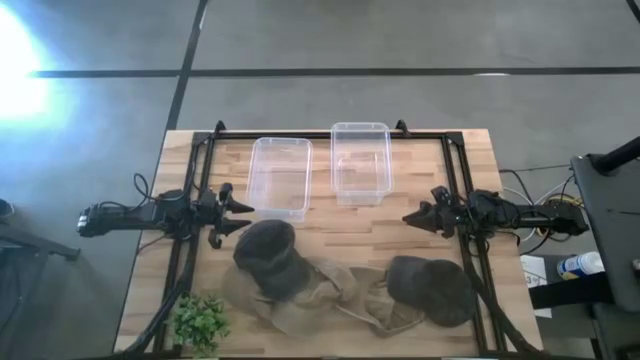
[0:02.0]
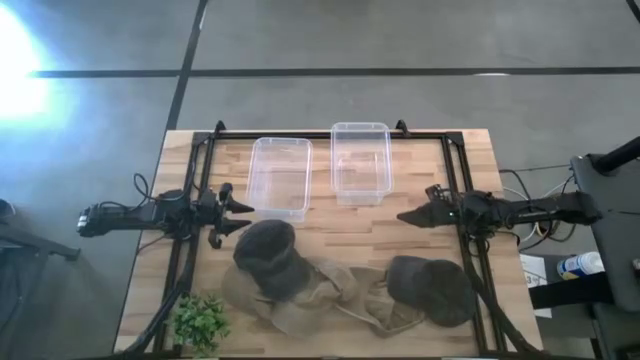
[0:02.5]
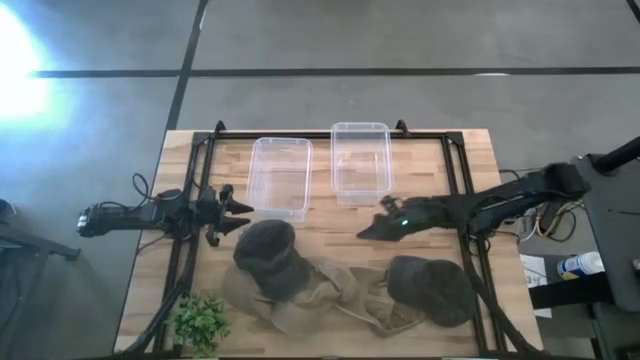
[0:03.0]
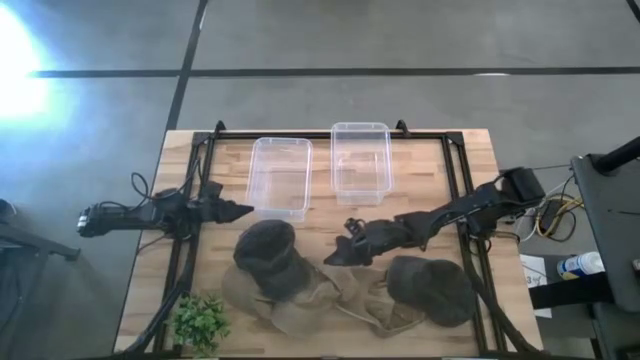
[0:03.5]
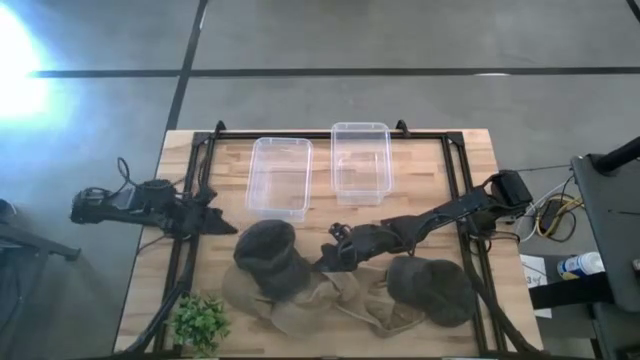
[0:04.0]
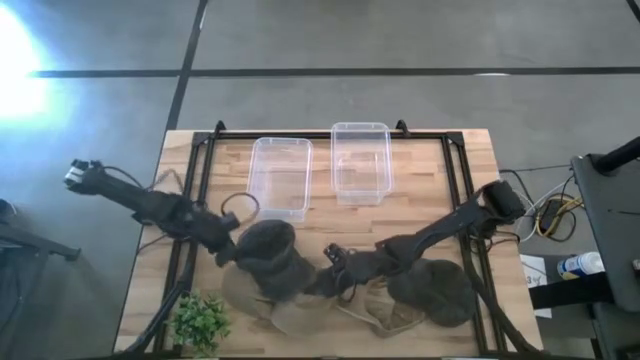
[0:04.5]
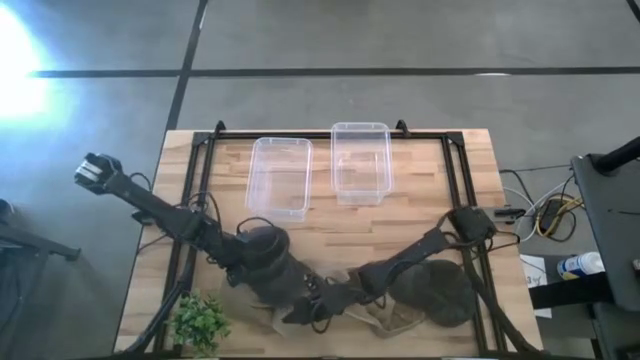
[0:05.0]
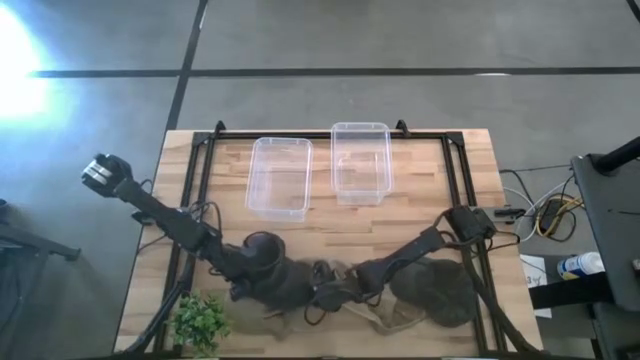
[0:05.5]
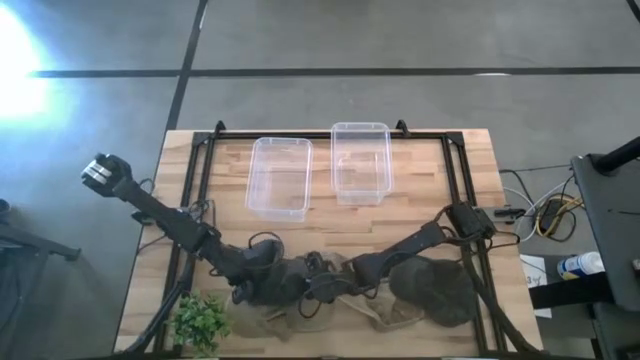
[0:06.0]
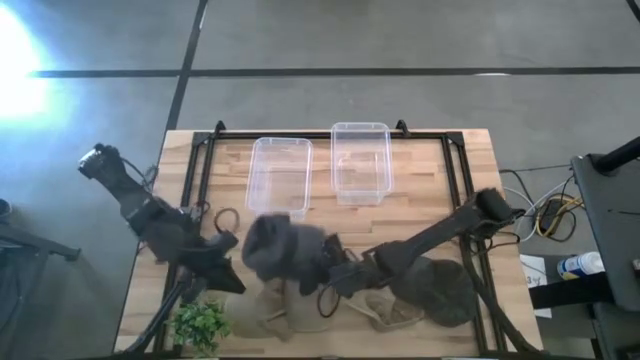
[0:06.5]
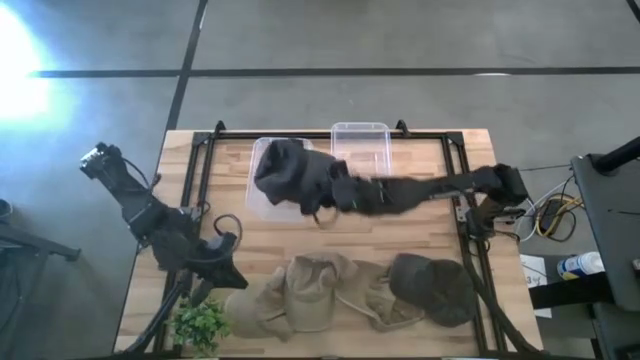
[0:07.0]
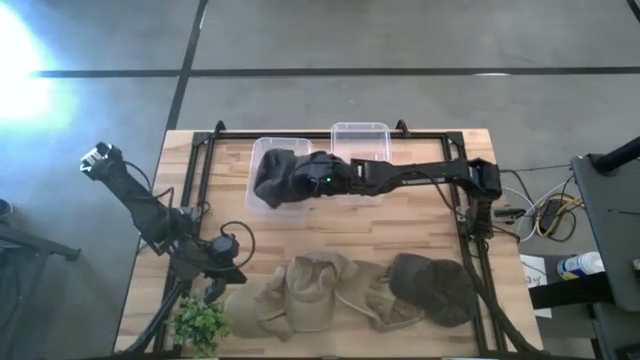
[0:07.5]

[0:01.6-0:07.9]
Task: Pick & Place hat
Put the left gray cap into the left transparent bin

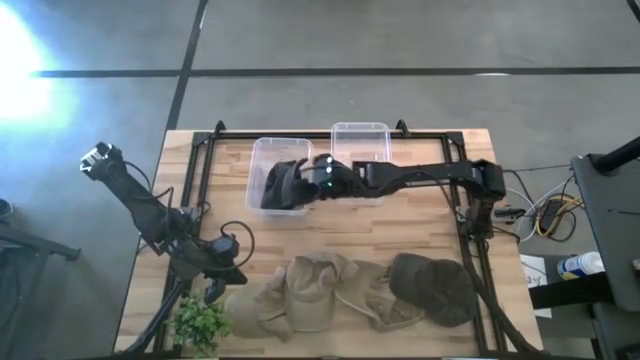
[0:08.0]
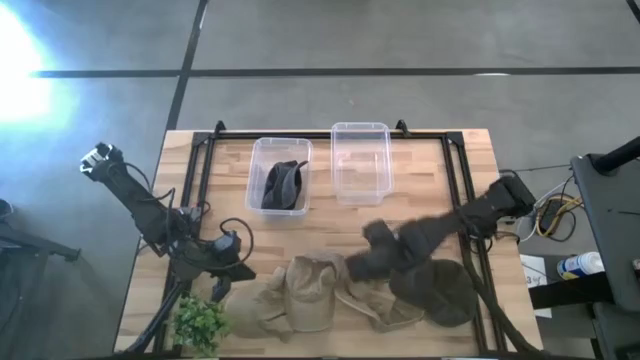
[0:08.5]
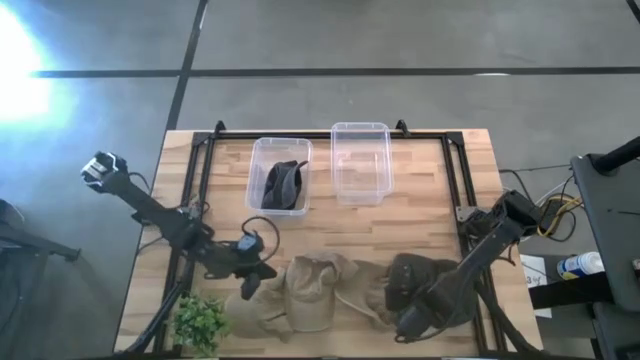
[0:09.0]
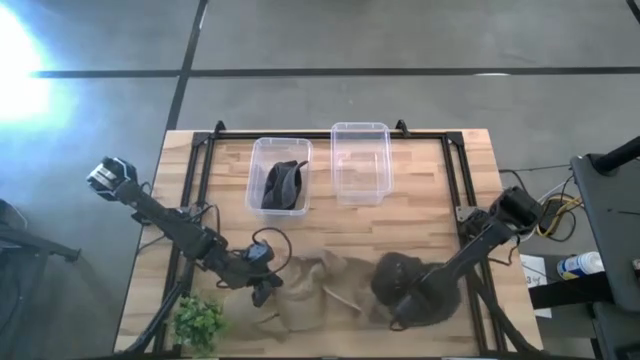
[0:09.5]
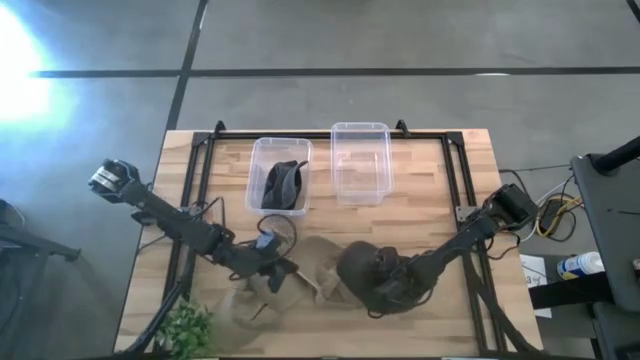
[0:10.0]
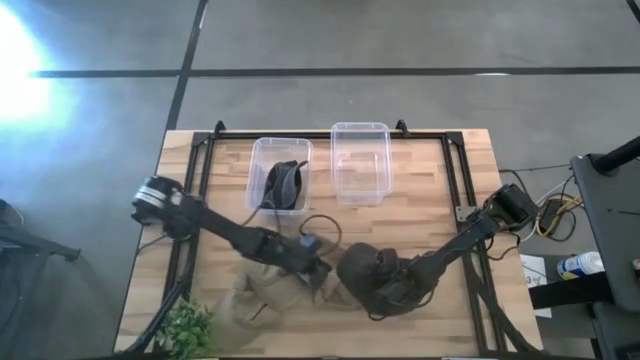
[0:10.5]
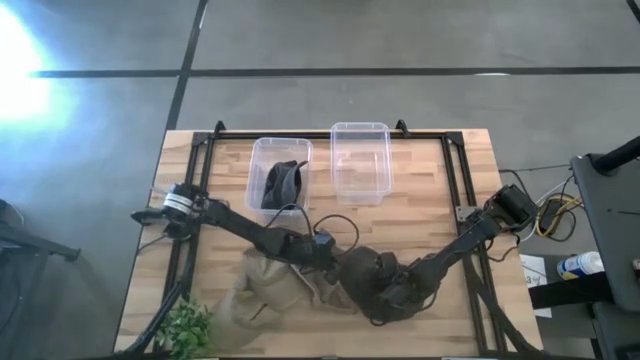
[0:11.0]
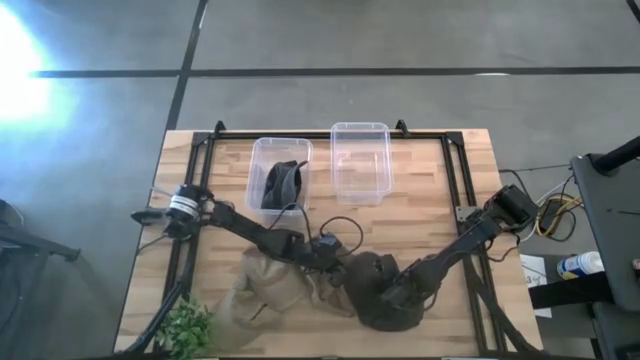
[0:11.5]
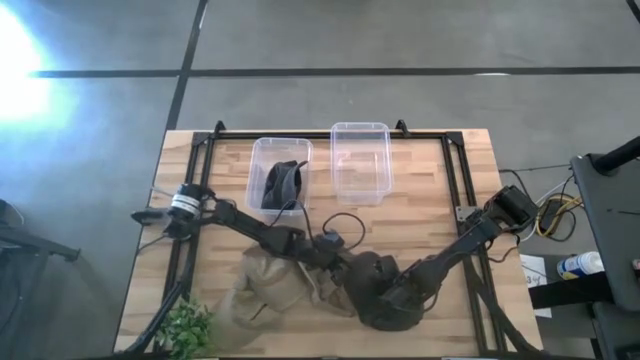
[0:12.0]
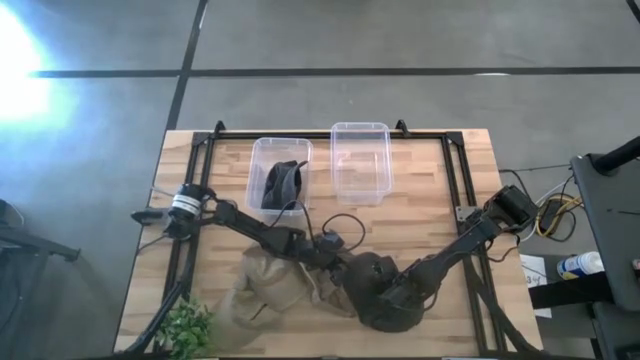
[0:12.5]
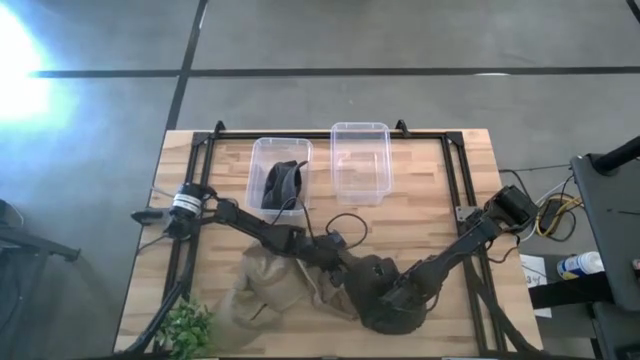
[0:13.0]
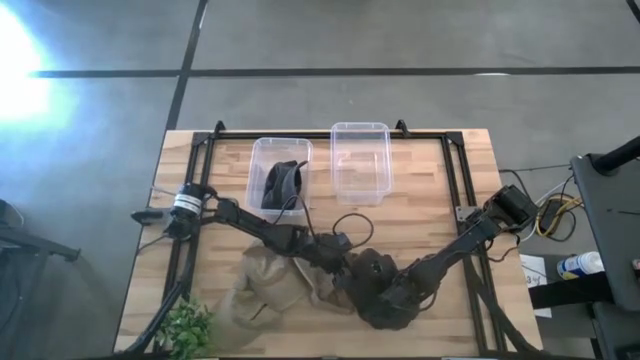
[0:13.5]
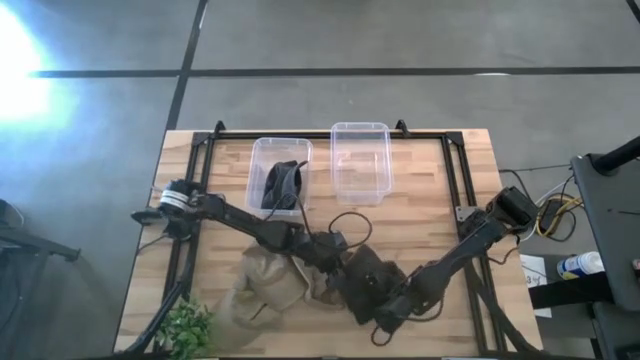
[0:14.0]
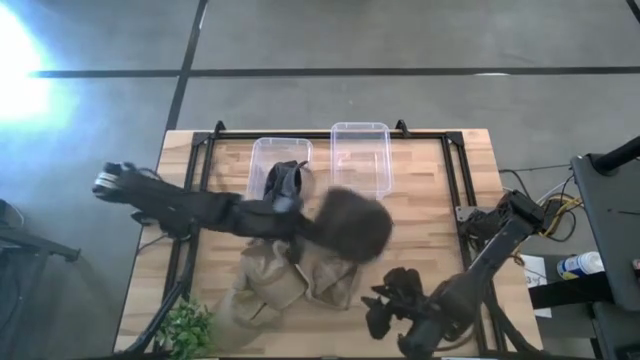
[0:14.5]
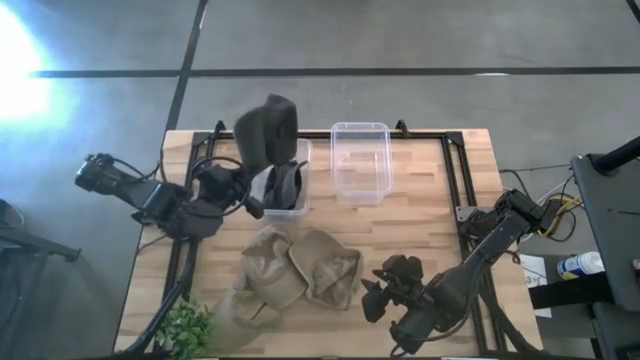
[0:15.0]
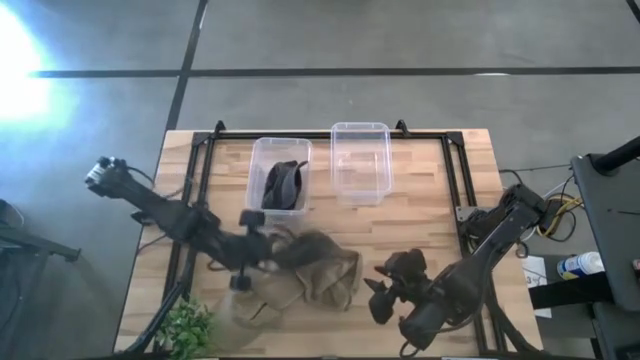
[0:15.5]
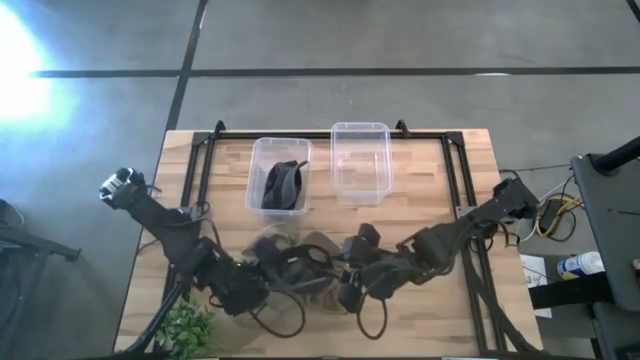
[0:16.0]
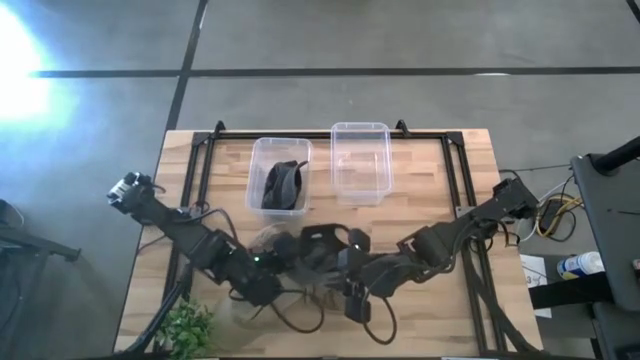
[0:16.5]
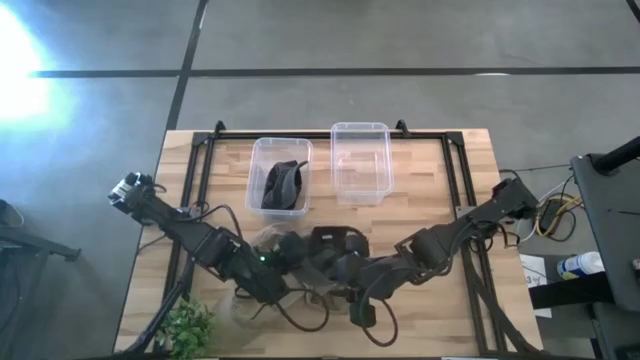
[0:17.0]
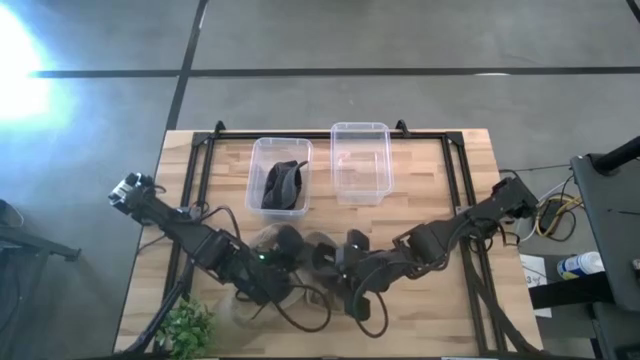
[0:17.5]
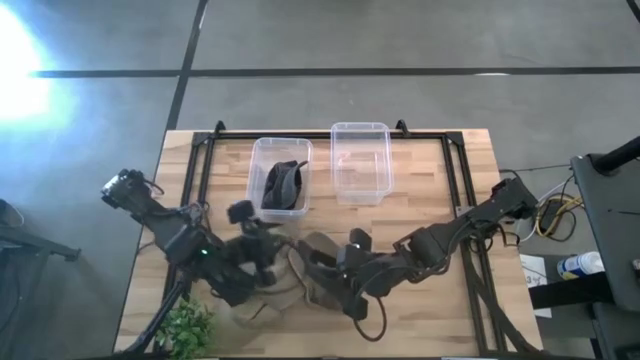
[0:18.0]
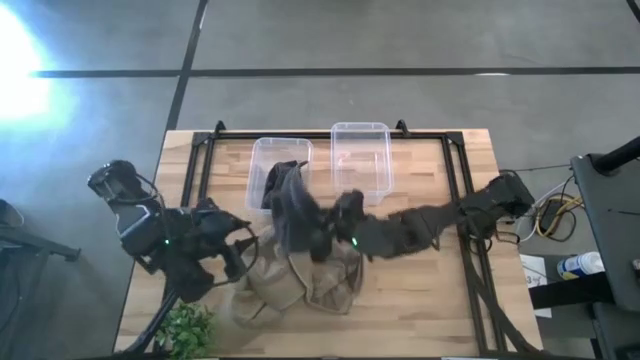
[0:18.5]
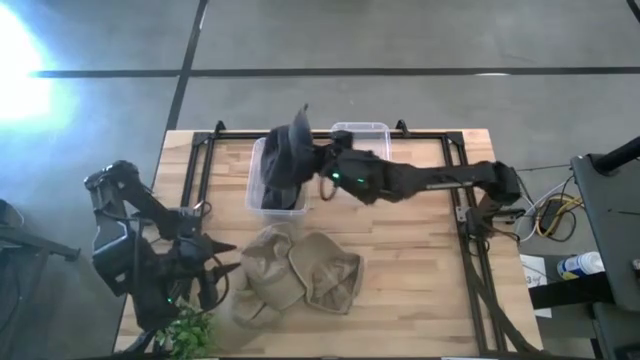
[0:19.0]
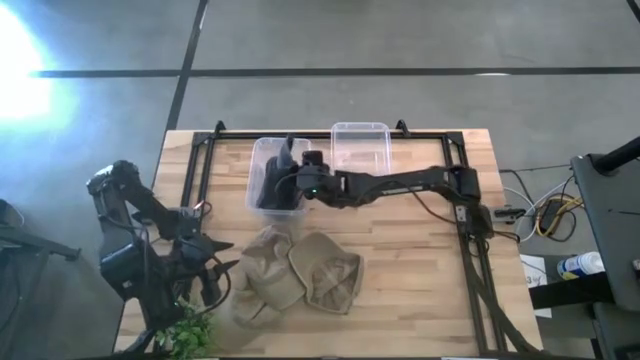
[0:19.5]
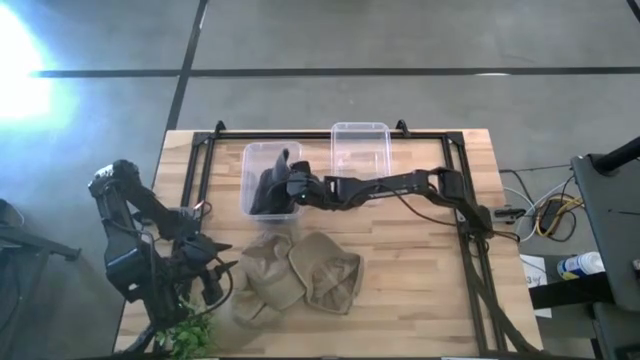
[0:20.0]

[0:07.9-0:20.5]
Put the gray cap into the left transparent bin

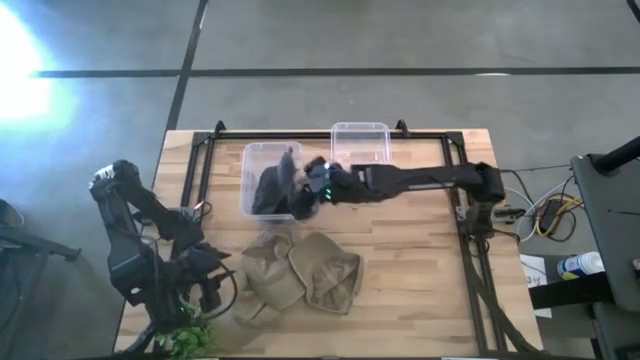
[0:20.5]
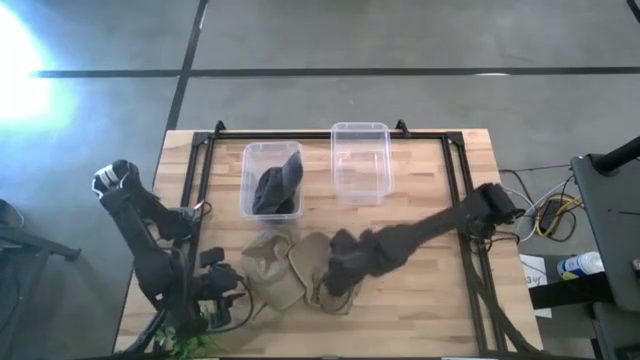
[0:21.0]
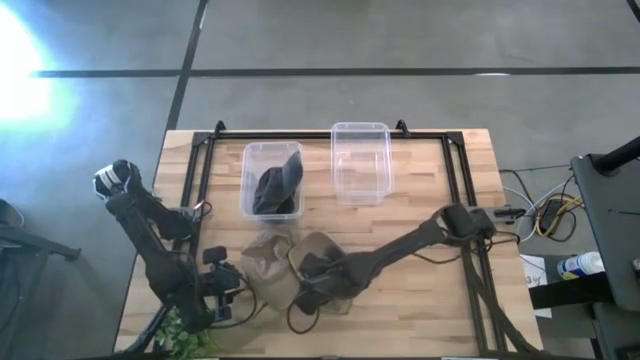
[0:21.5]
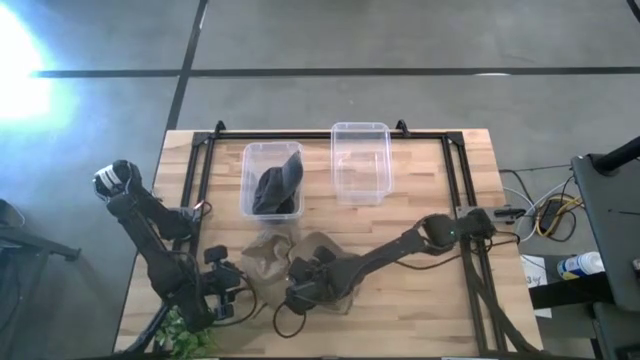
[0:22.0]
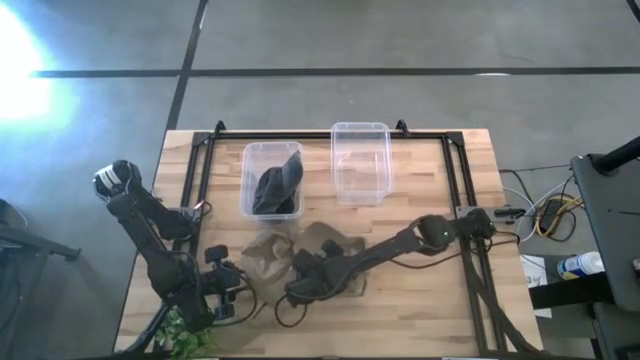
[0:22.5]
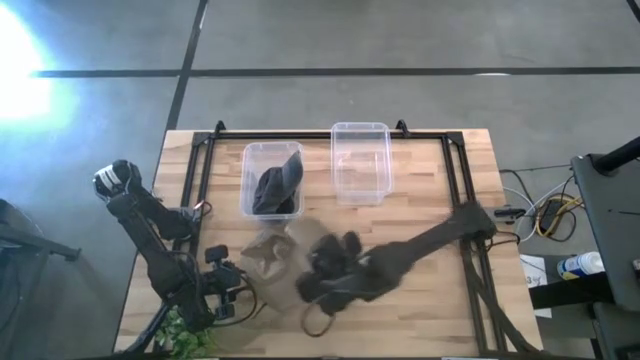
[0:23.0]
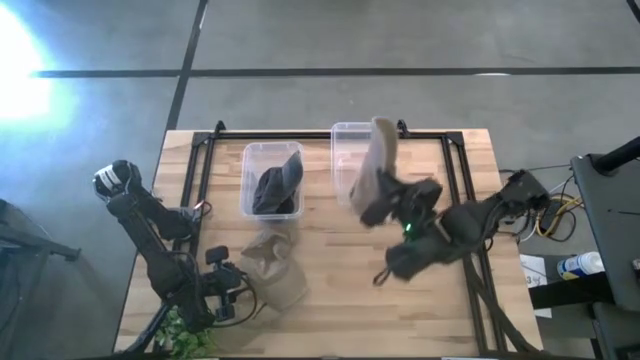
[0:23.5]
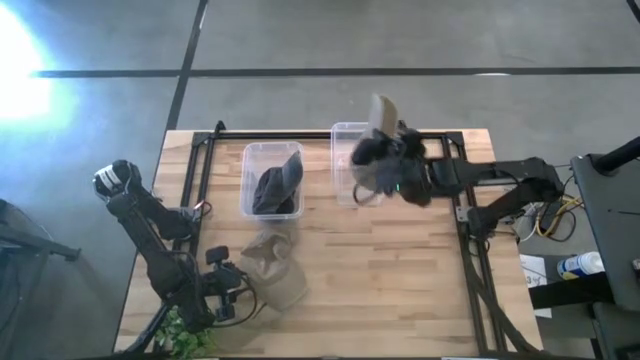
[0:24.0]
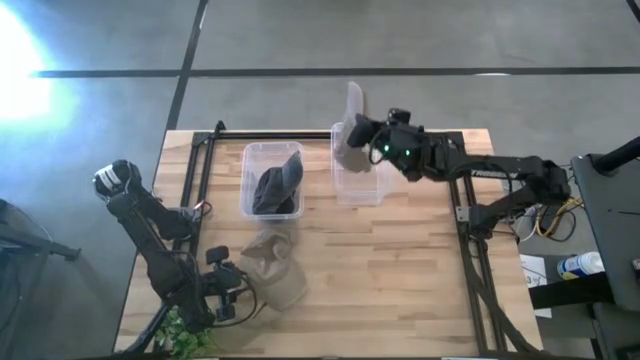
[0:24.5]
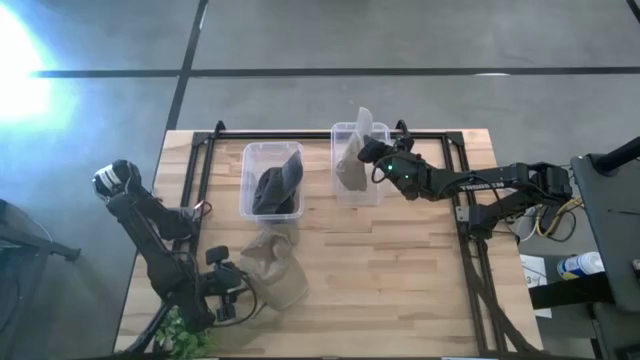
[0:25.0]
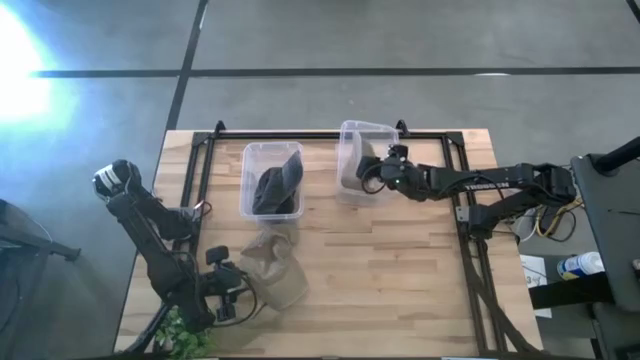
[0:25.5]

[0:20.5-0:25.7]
Put the top right brown cap into the right transparent bin
